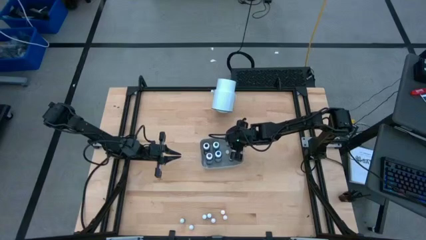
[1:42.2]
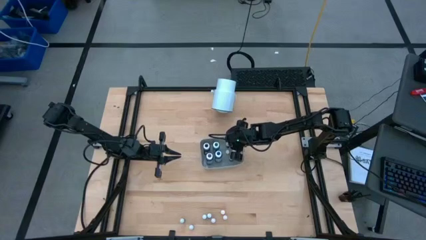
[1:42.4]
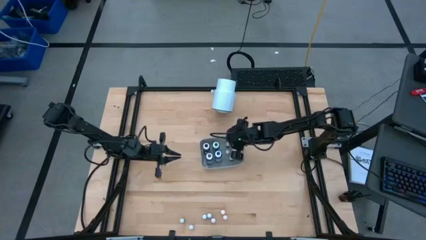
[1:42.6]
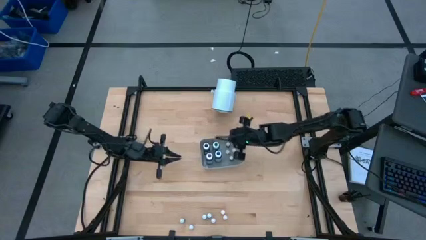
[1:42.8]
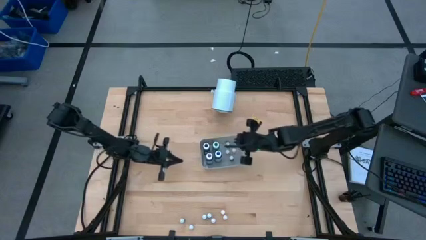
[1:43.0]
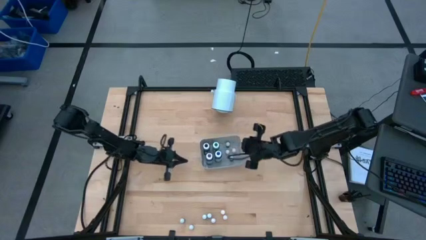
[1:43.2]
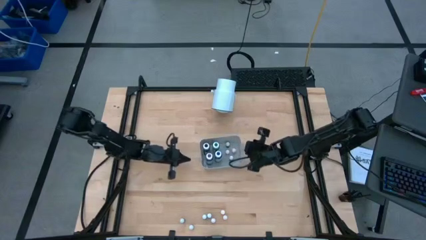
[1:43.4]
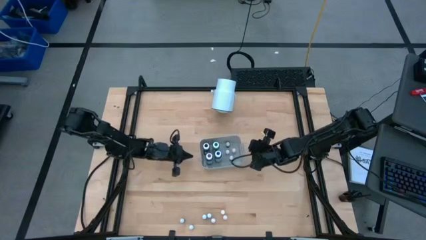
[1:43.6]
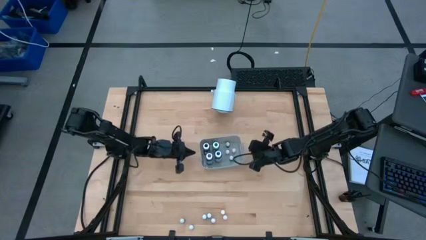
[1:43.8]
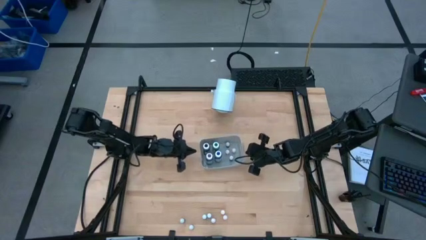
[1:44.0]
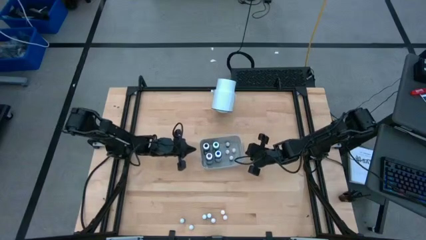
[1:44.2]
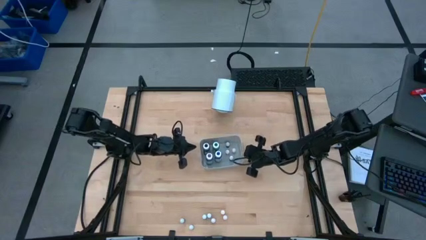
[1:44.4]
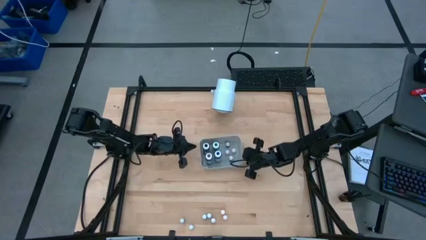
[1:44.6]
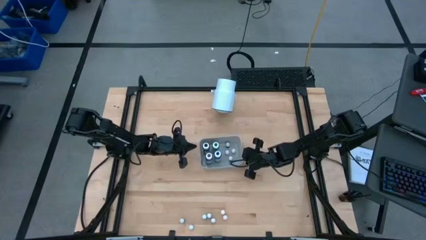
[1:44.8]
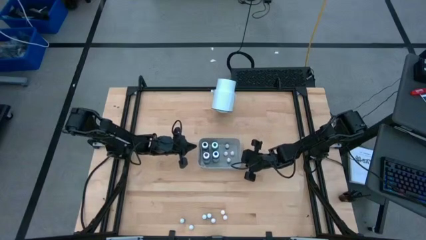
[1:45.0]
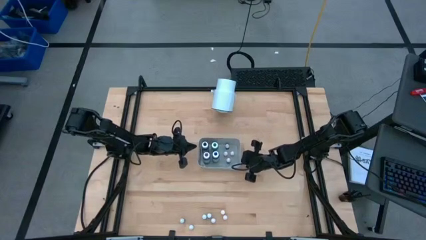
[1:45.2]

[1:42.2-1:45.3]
Task: Pick & Place food coloring
Adjust the gray bin

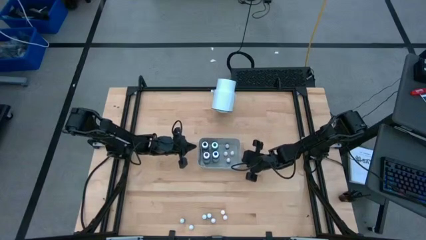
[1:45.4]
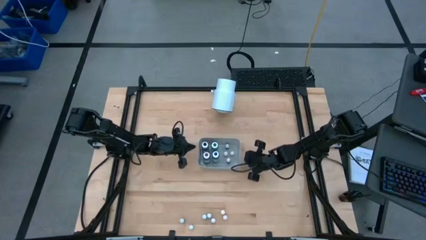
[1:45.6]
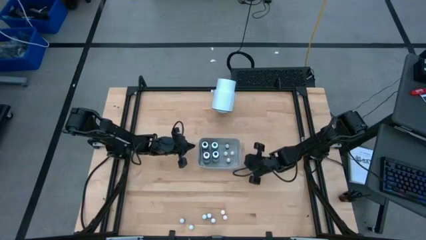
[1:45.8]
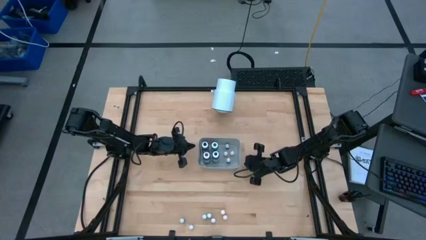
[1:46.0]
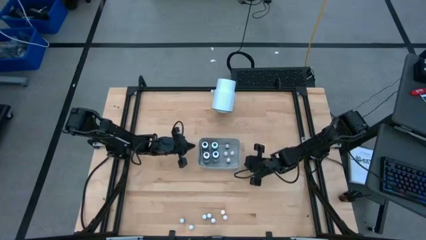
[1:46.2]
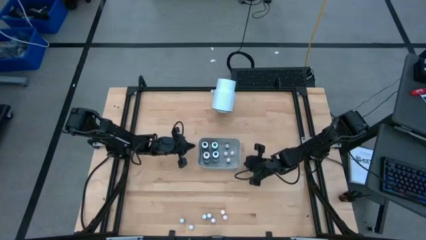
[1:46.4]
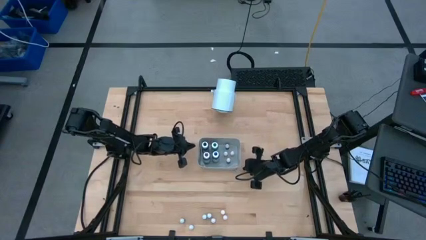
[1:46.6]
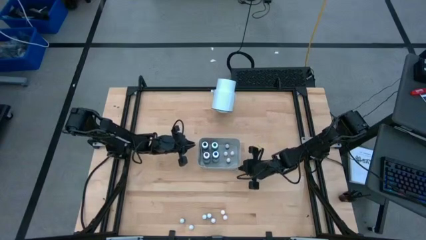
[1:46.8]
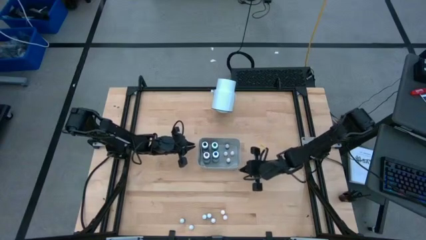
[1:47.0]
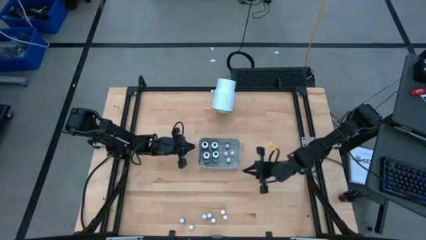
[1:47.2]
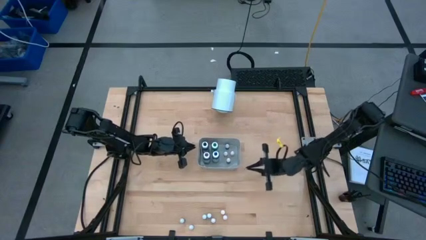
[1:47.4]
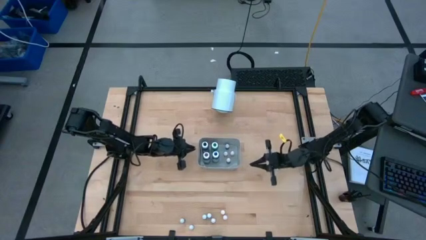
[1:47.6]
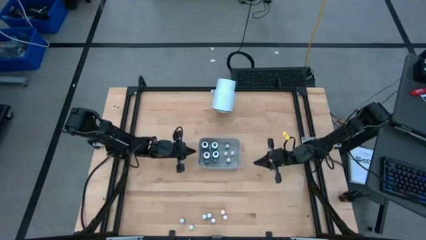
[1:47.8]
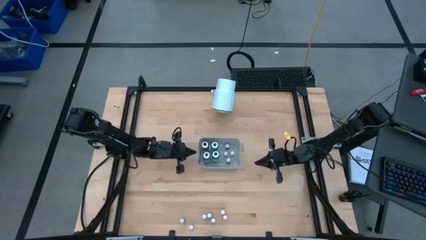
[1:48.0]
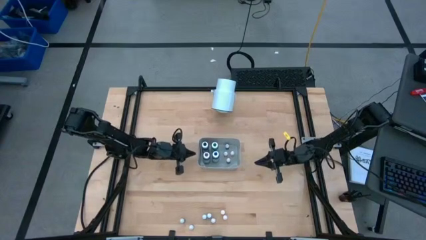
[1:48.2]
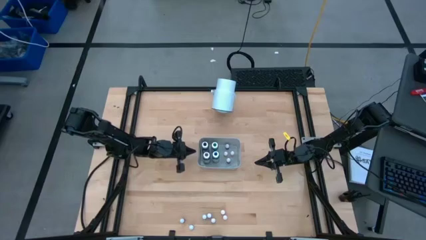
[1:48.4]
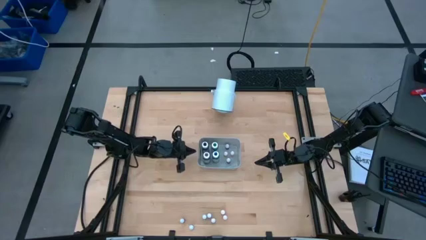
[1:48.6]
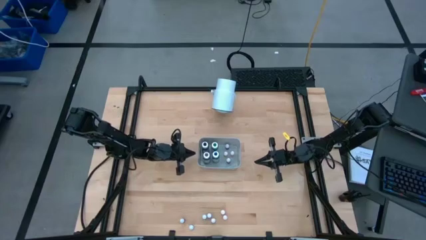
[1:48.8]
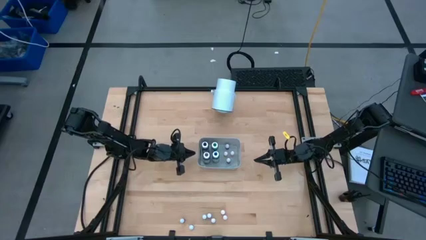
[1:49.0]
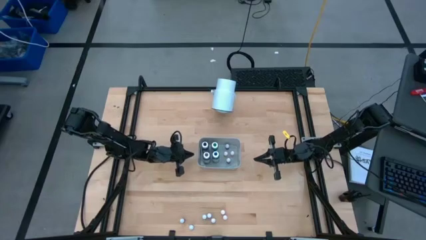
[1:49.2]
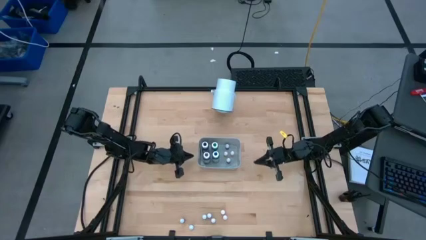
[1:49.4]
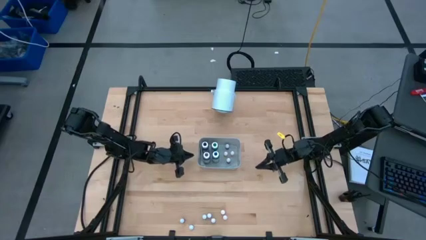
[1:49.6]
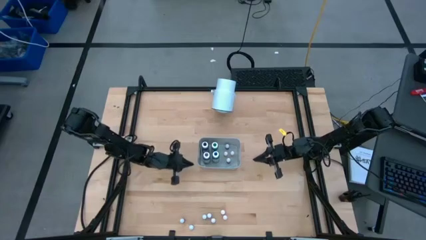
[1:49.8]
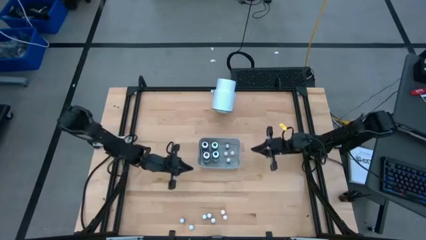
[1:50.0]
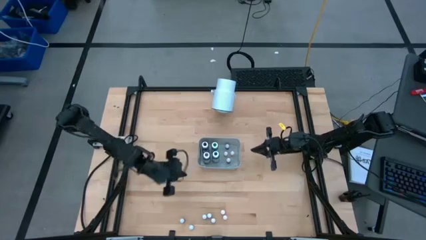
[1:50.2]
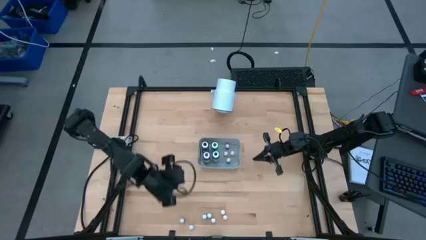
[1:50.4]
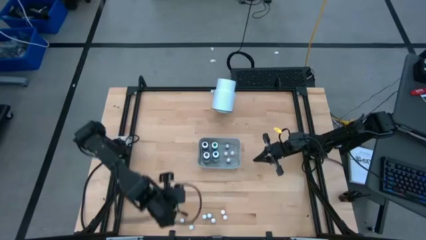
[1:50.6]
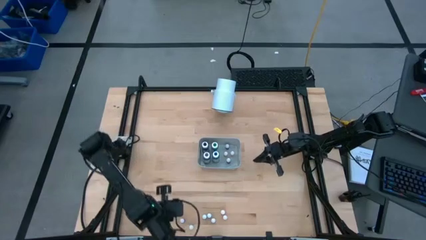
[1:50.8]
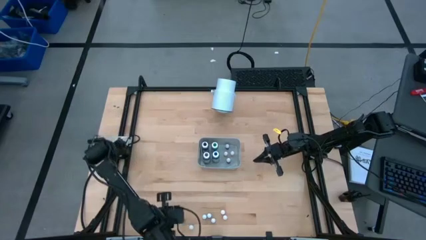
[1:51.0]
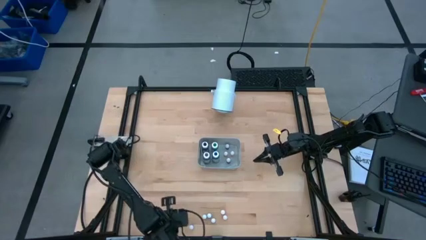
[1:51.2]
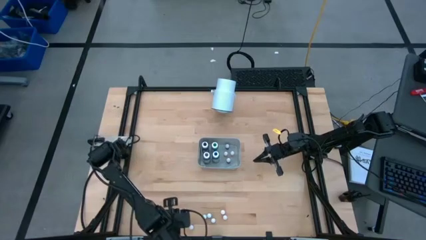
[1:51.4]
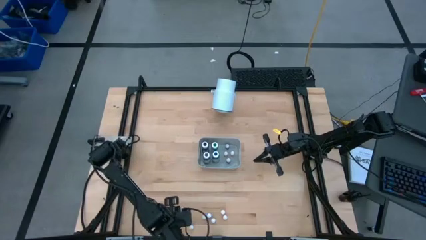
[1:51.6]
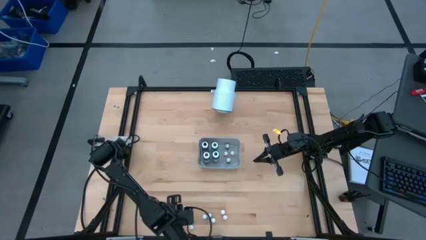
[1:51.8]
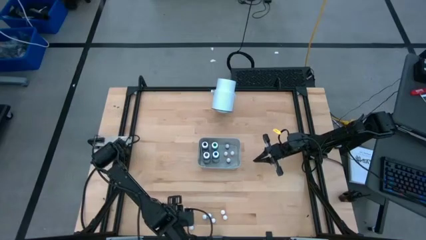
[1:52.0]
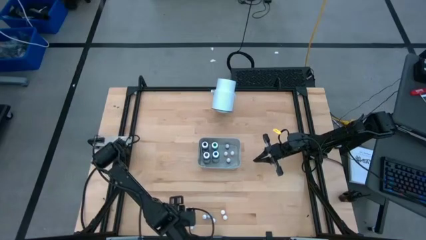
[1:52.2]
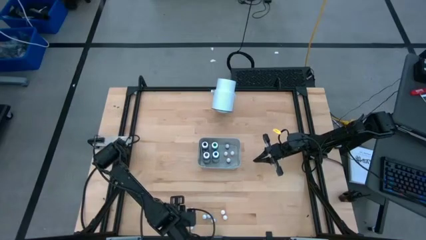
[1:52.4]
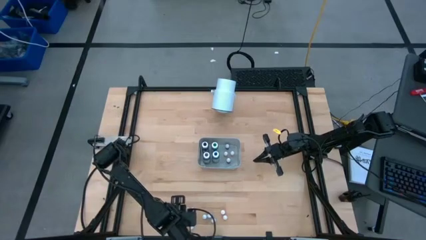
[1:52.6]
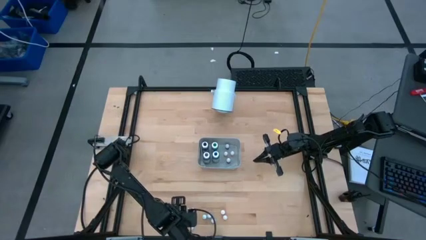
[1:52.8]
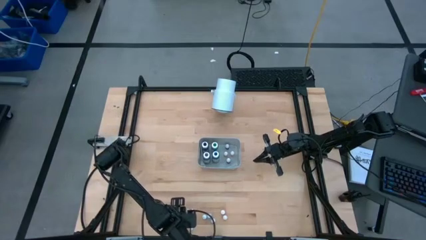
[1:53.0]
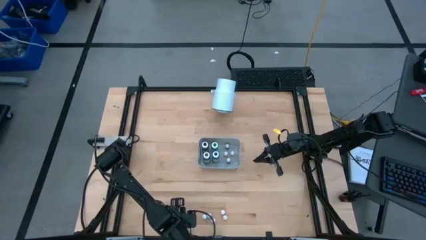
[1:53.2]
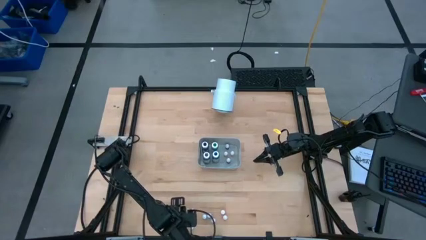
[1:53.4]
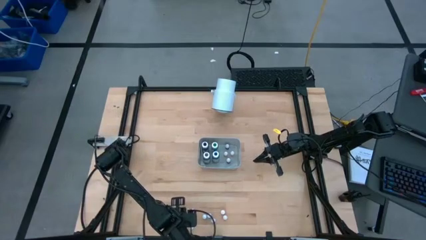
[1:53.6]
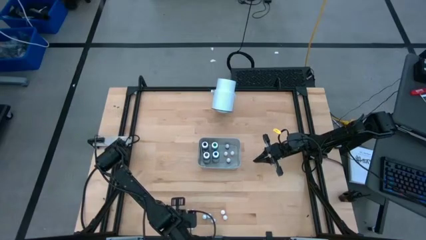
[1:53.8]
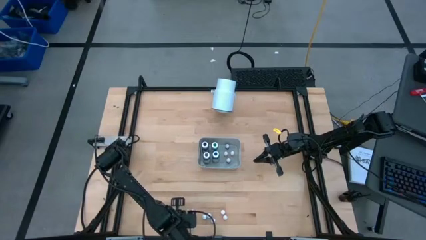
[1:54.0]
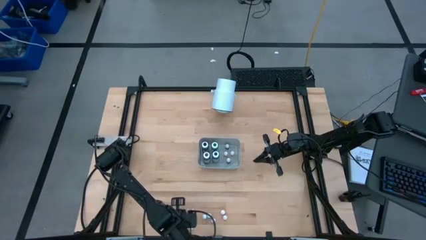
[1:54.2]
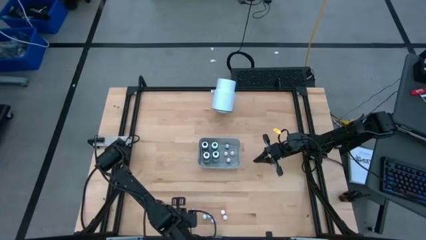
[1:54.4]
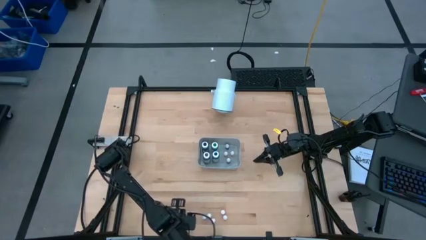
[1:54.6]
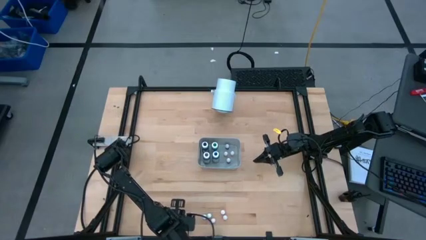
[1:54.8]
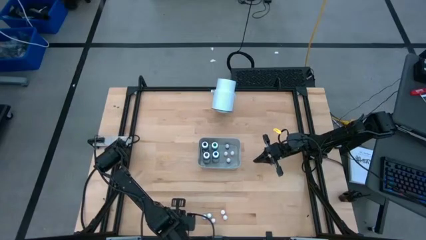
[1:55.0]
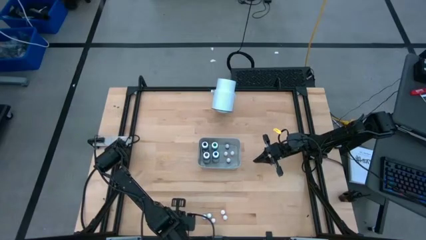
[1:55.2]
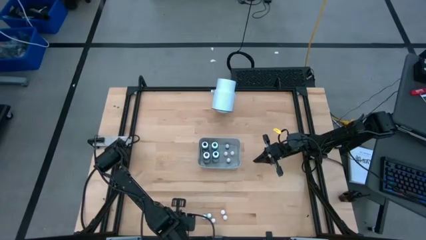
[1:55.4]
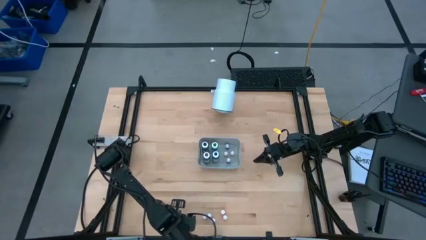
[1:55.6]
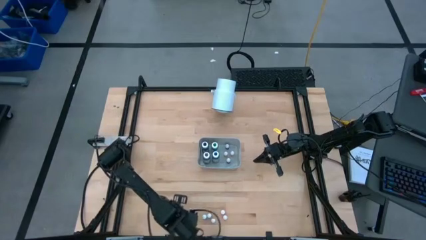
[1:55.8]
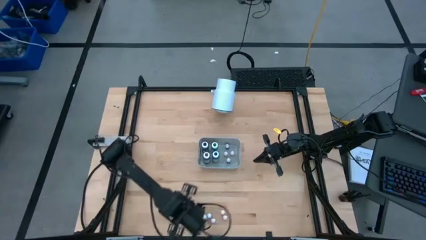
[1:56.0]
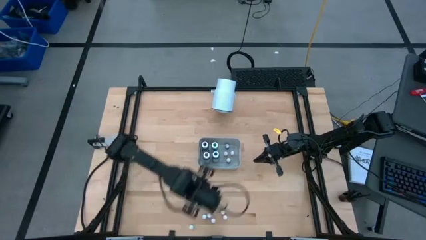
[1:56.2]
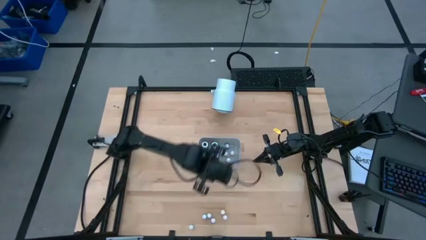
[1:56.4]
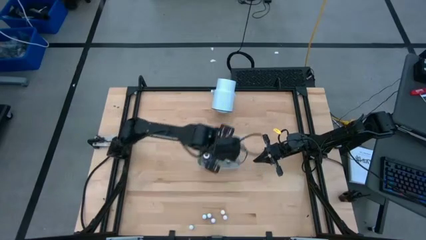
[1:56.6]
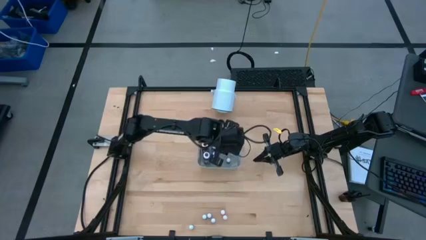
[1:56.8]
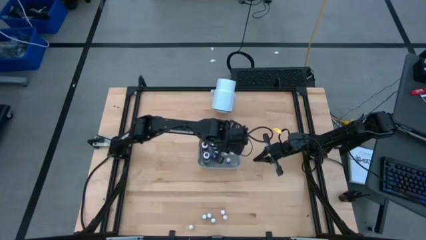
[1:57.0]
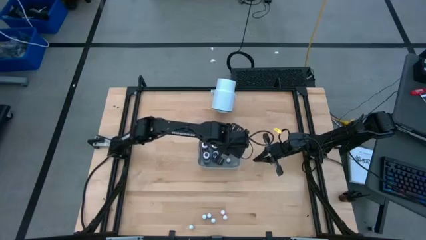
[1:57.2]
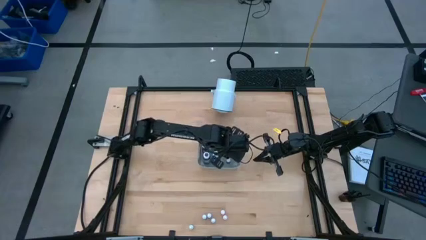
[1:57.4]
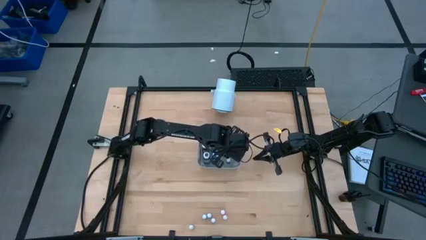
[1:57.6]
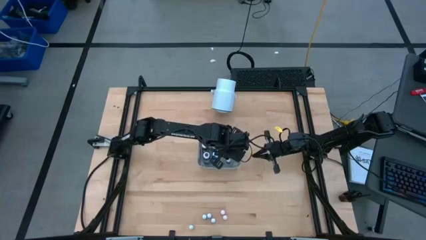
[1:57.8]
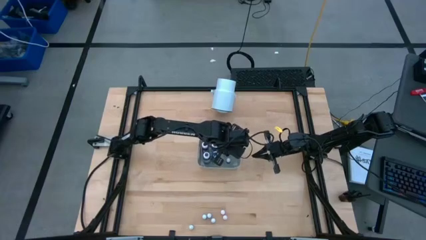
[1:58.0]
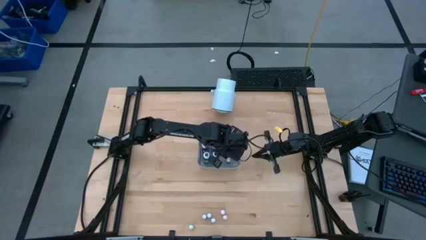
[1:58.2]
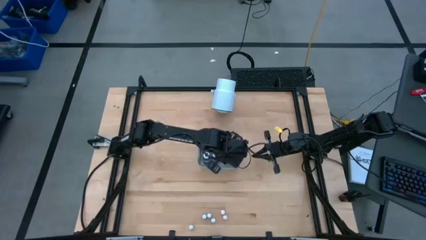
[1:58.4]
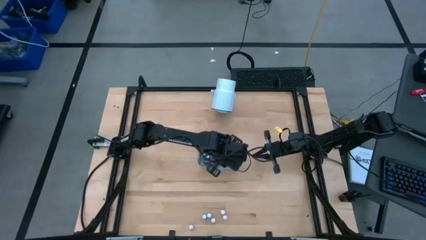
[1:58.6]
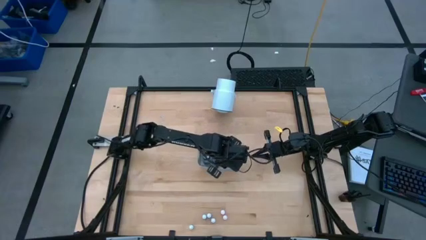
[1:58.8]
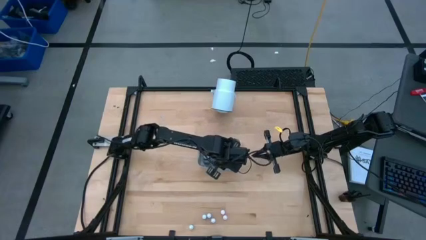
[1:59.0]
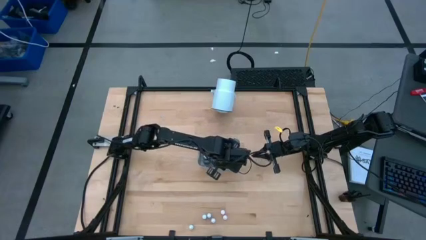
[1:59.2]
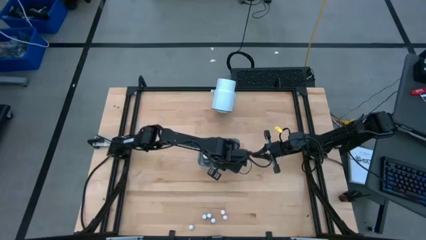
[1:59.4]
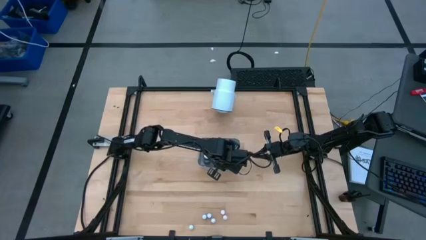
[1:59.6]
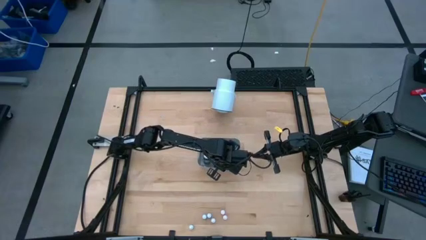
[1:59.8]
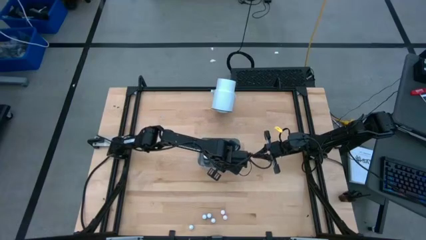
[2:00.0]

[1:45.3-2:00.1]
Put the small blue food coloring bottle into the gray bin
